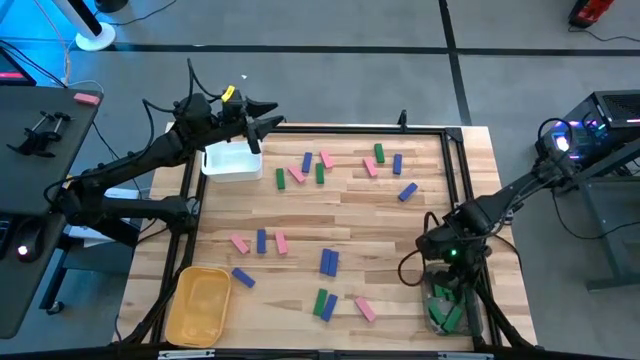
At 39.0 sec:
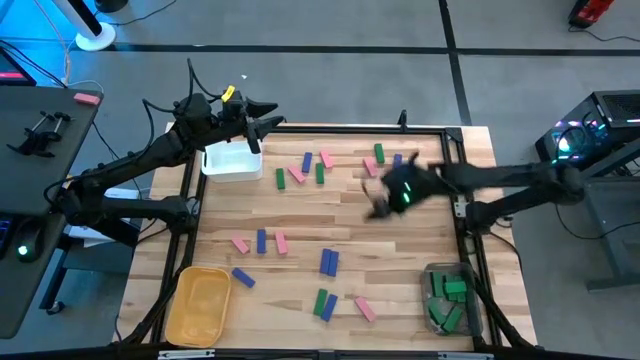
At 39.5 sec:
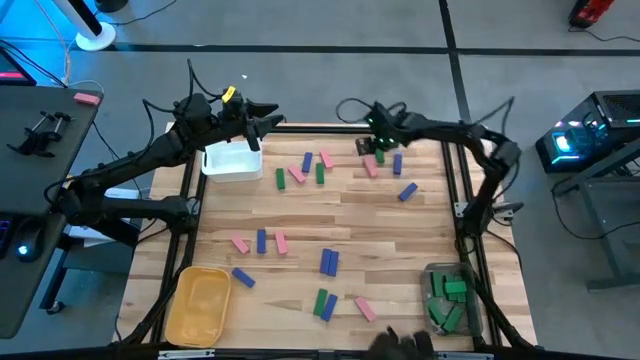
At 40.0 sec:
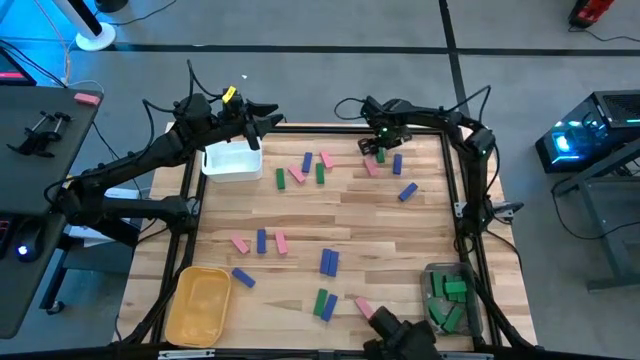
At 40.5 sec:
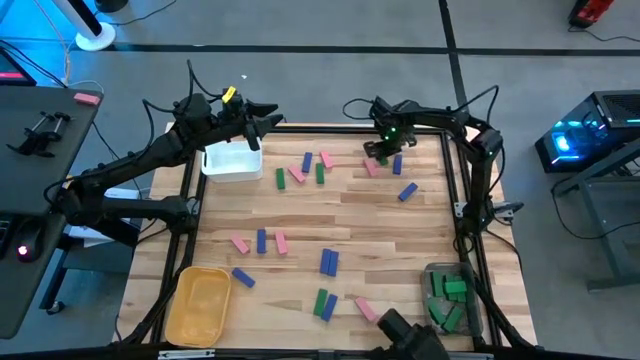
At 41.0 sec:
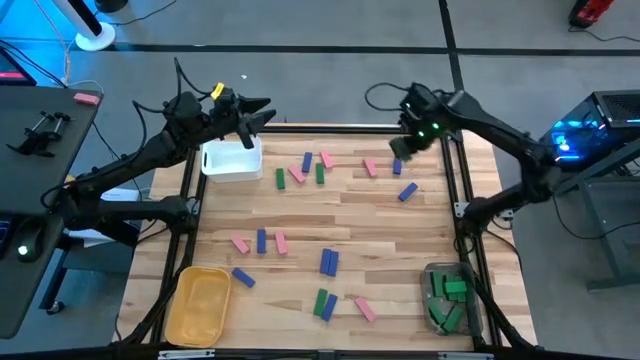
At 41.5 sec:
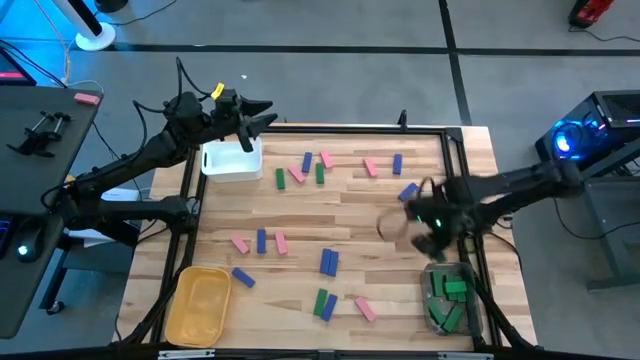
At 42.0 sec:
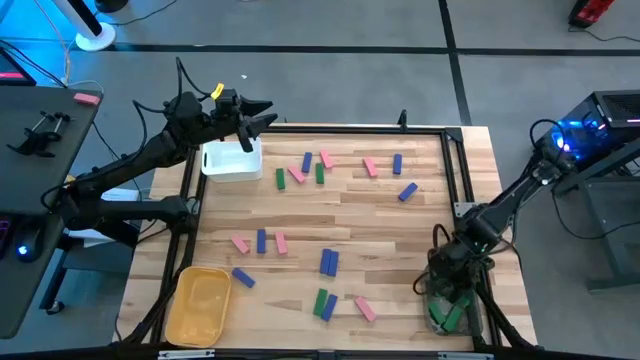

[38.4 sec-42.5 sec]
Task: Sort blocks
Put the green block into the black transparent bin

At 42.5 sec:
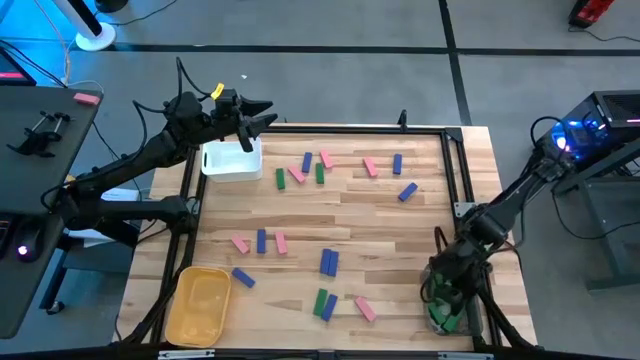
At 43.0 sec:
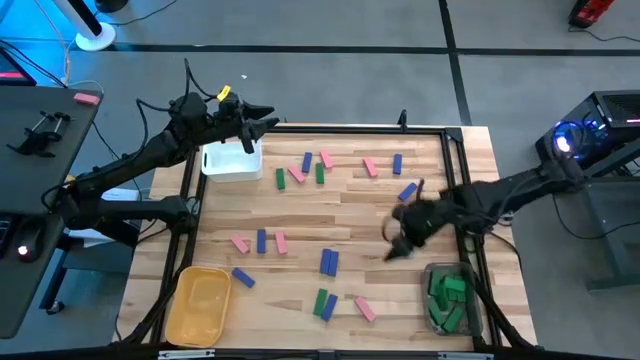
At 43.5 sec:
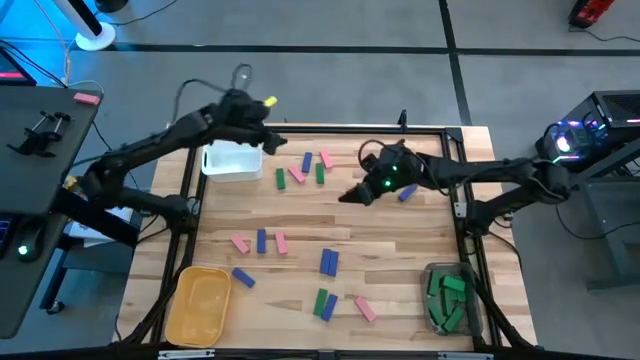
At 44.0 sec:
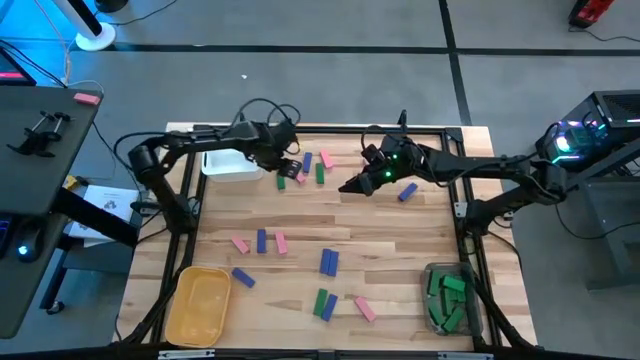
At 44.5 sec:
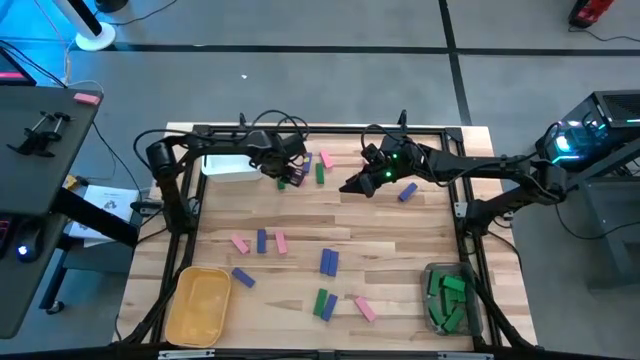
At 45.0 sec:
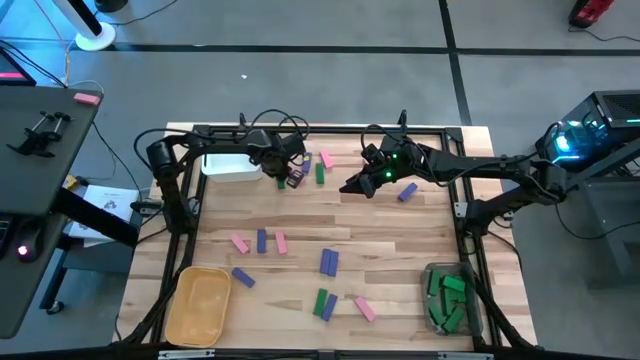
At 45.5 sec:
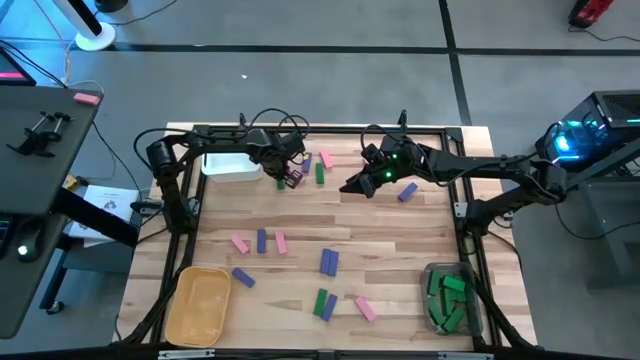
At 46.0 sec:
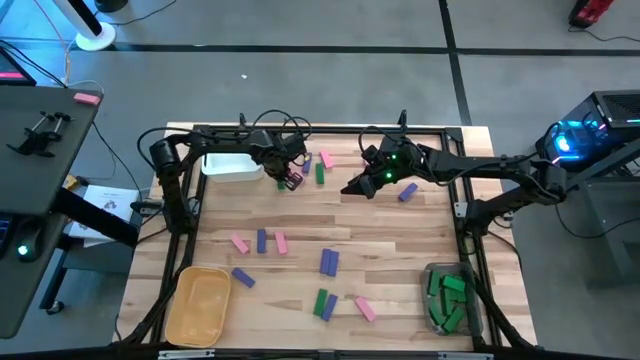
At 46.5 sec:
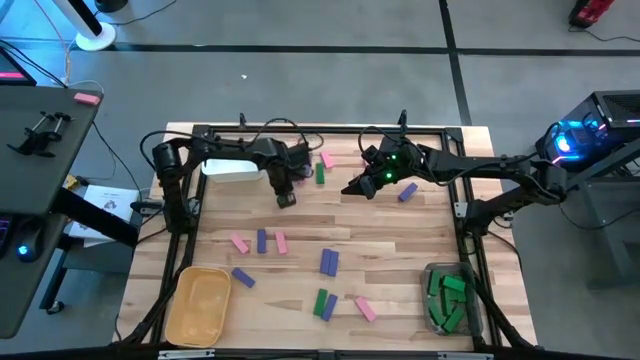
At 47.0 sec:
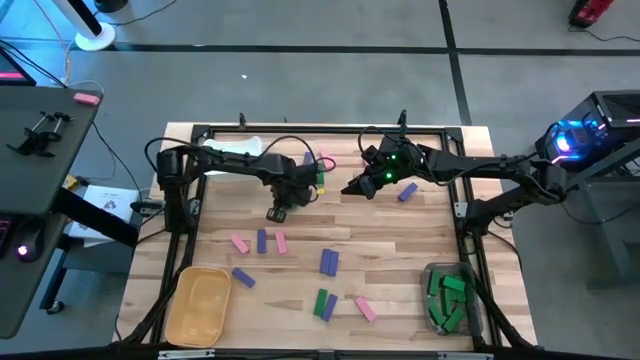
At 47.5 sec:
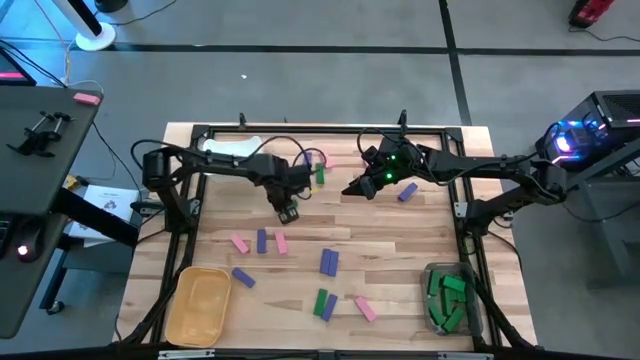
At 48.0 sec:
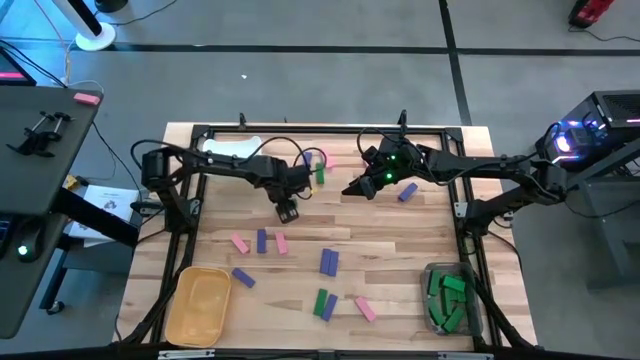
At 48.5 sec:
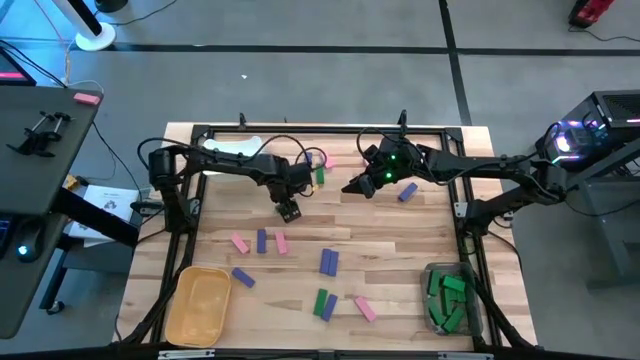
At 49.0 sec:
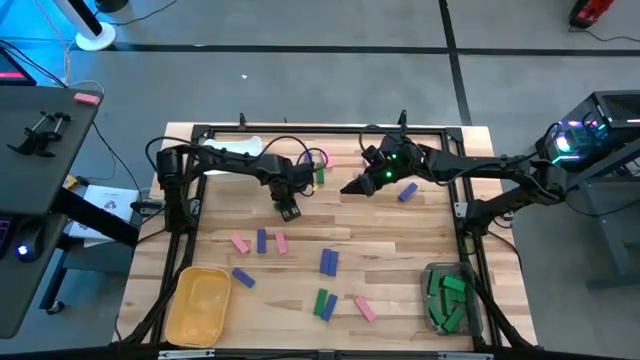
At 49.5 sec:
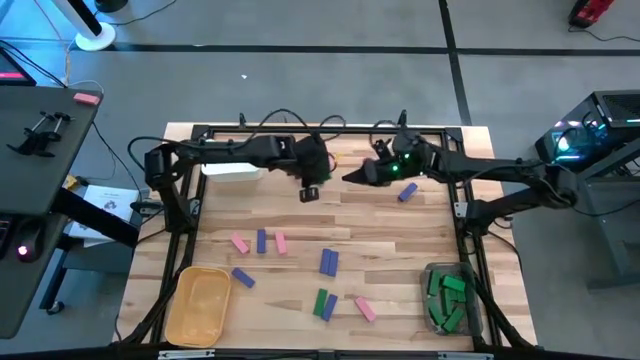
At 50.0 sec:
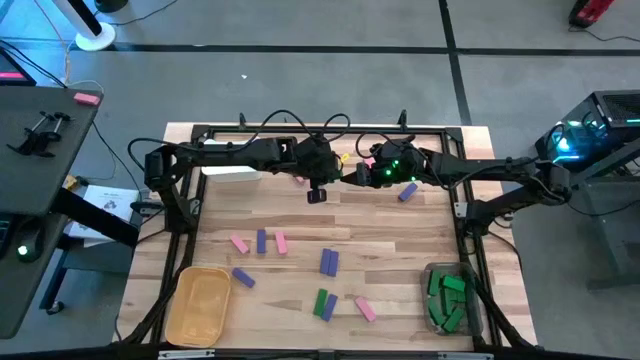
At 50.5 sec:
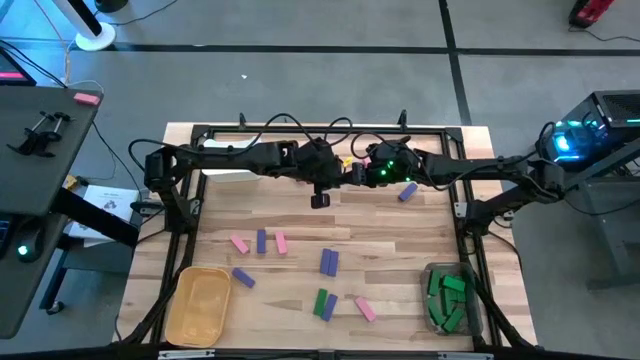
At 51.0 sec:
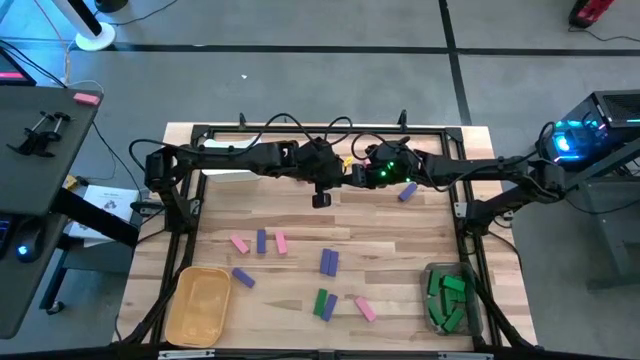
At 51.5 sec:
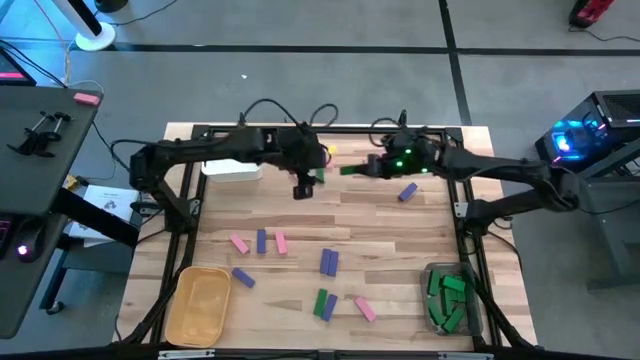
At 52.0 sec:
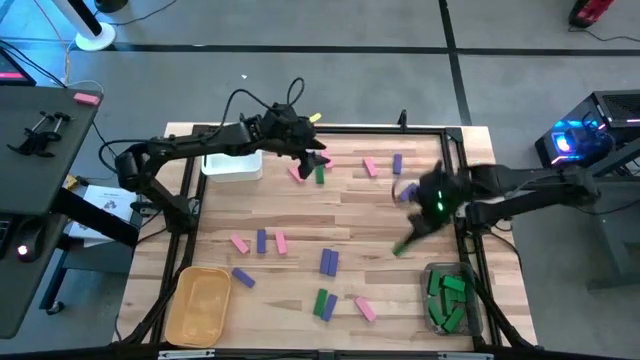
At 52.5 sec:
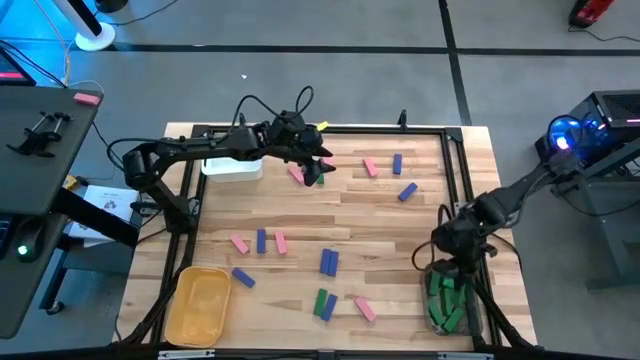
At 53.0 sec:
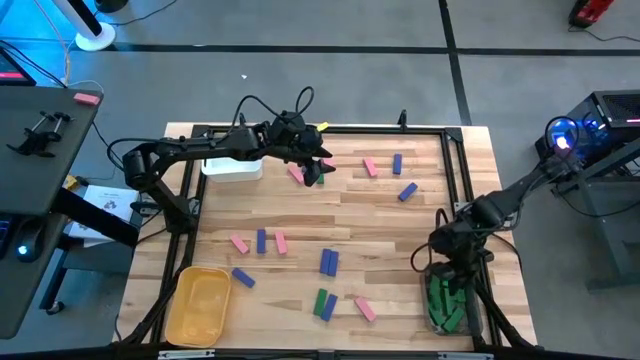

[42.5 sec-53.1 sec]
Put the green block into the black transparent bin

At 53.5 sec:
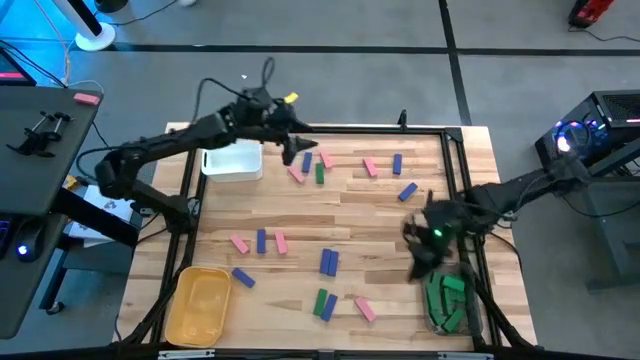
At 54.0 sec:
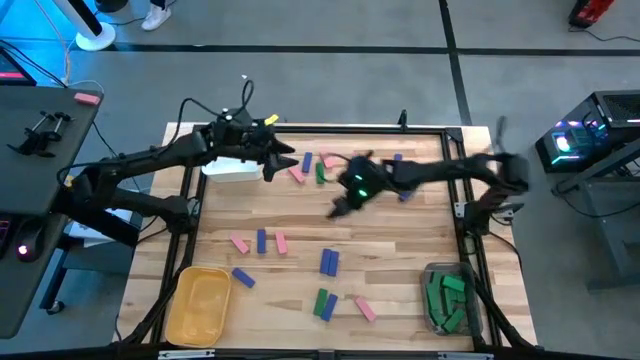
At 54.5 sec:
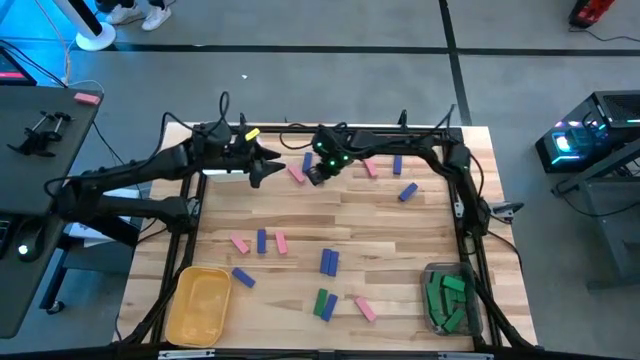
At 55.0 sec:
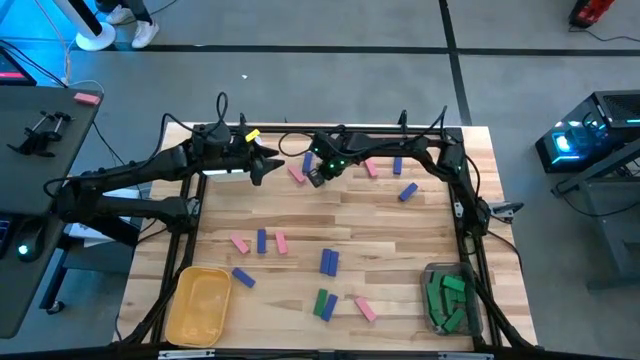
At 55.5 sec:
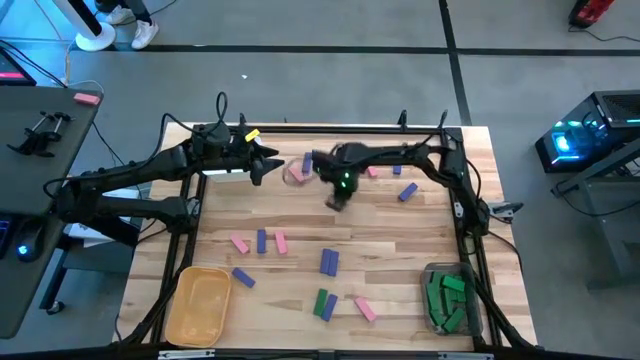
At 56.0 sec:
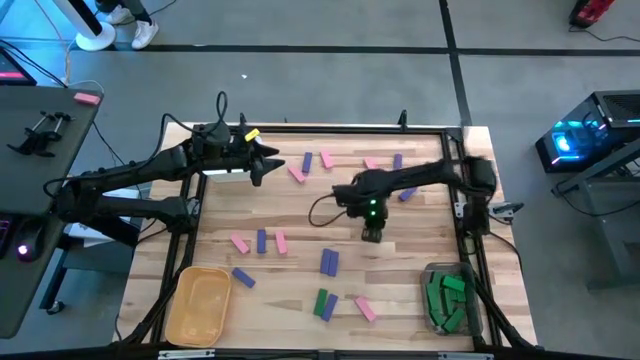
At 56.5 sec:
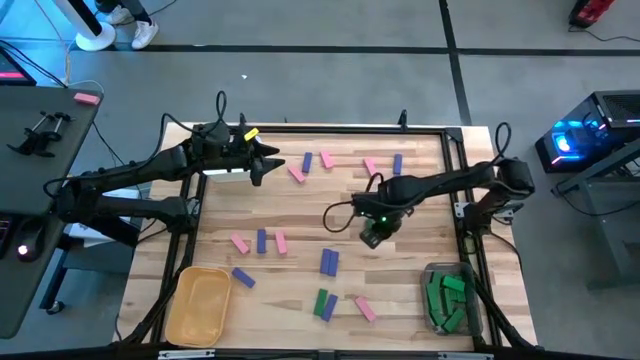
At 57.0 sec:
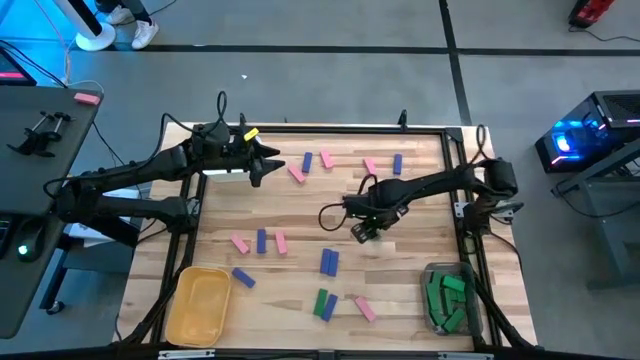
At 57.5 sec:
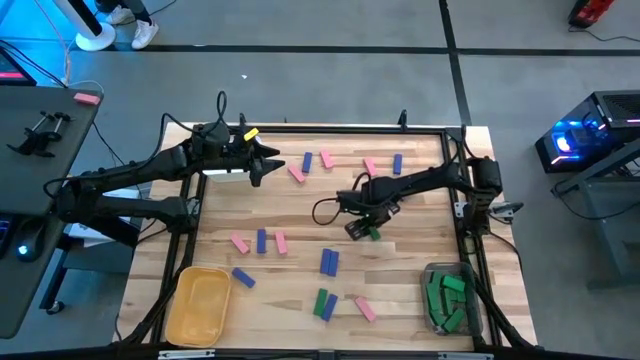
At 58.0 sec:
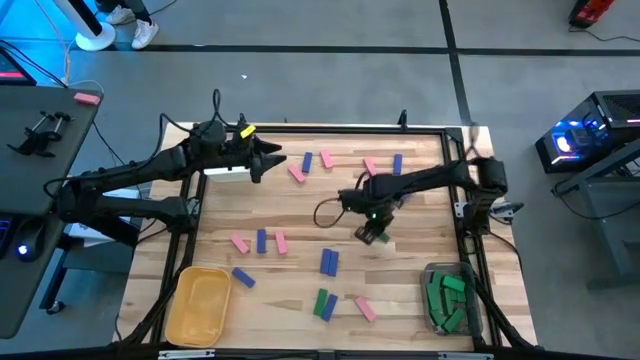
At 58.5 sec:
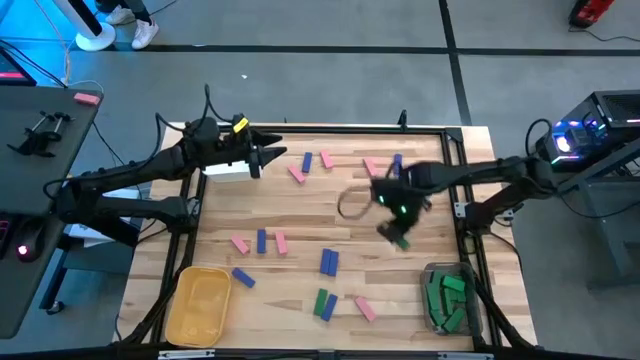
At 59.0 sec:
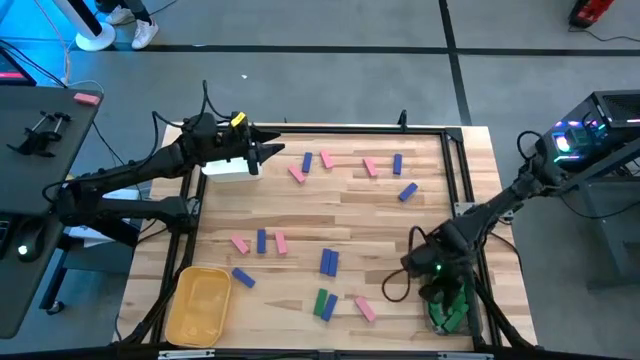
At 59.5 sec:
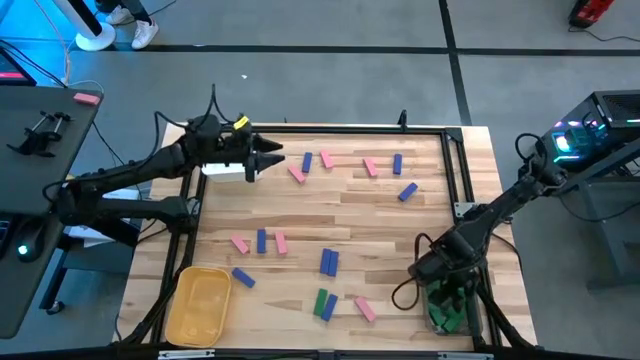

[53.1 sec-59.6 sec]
Put the green block into the black transparent bin
